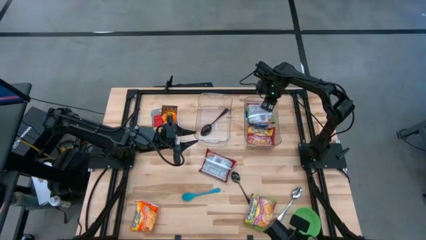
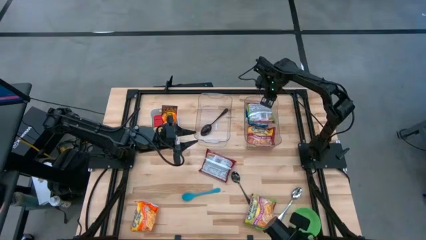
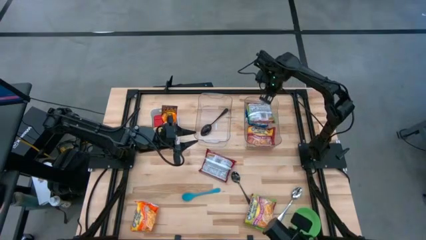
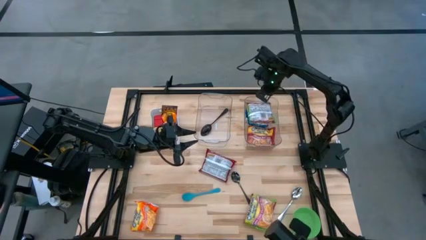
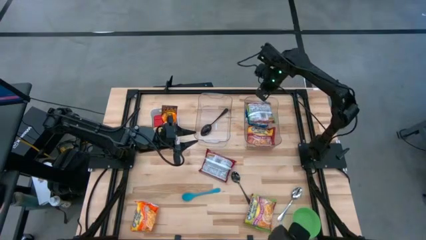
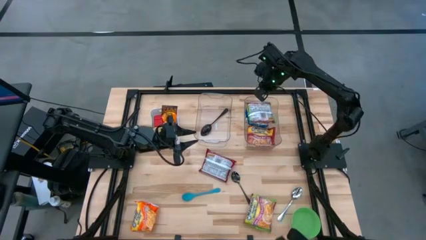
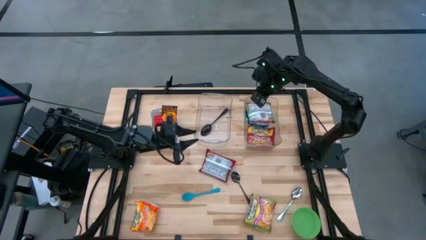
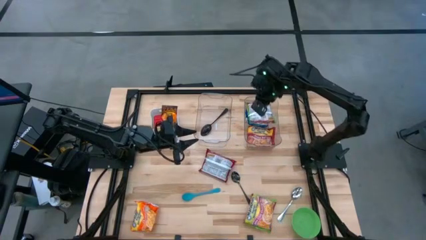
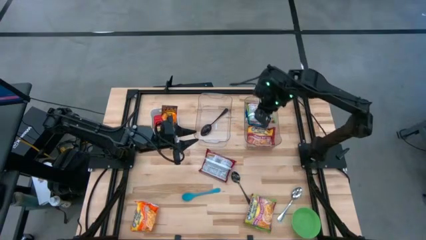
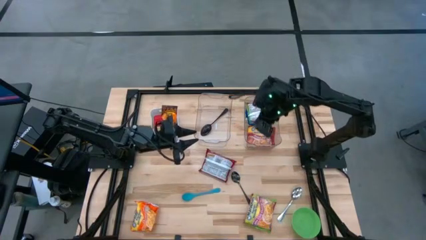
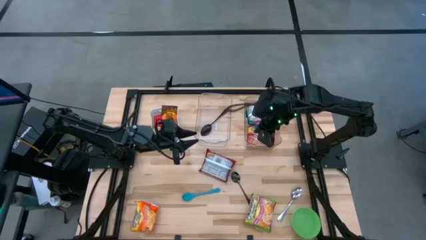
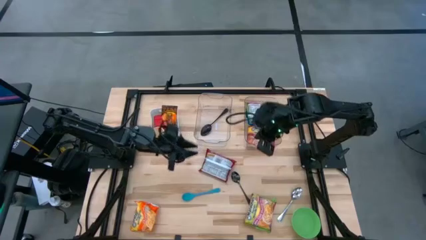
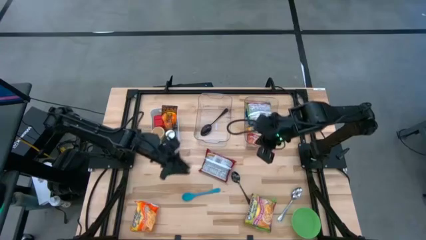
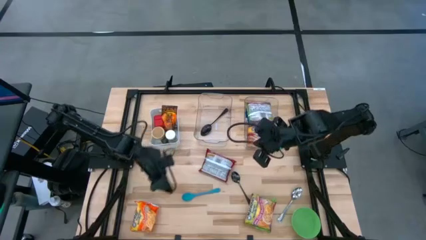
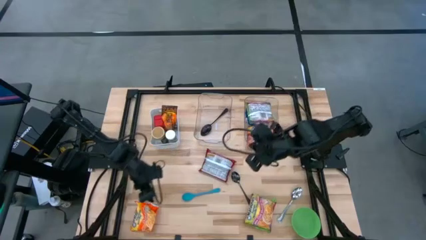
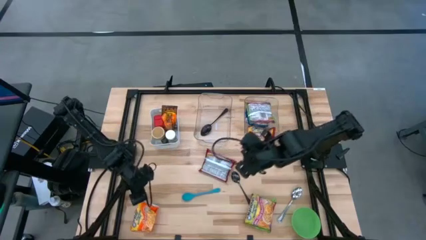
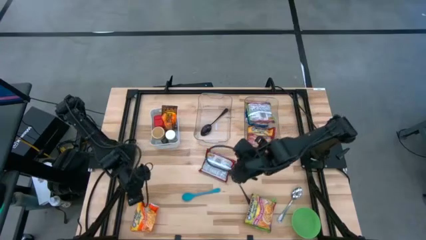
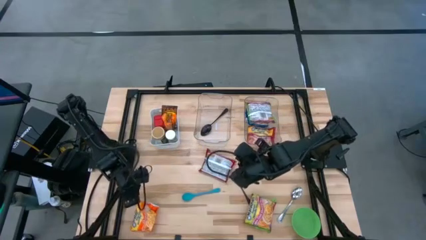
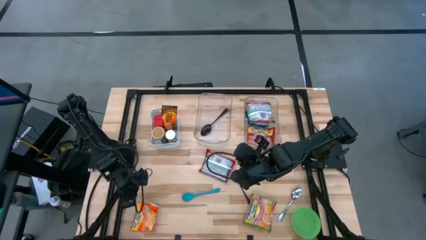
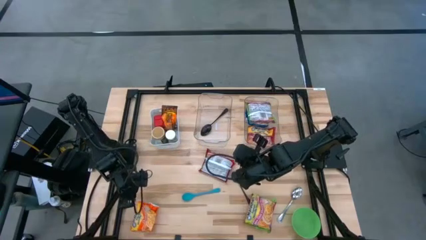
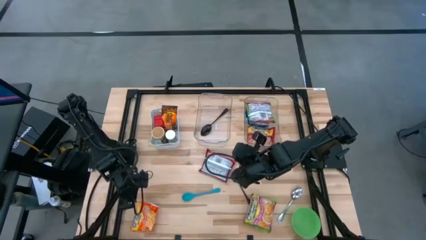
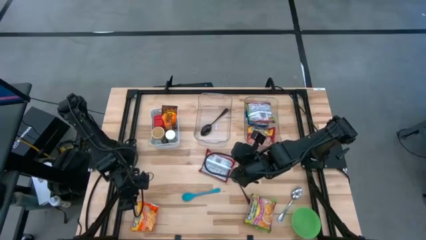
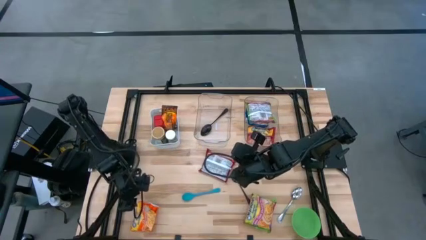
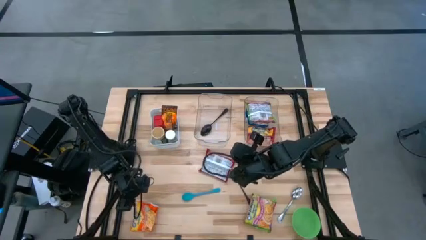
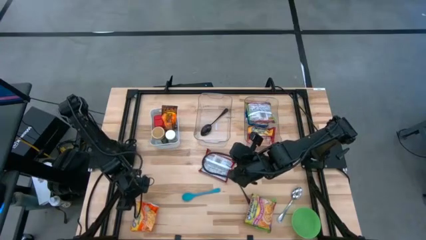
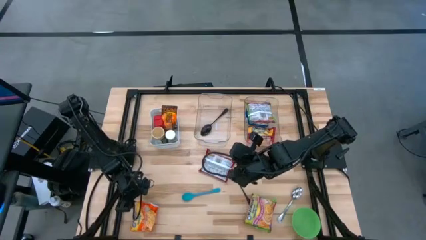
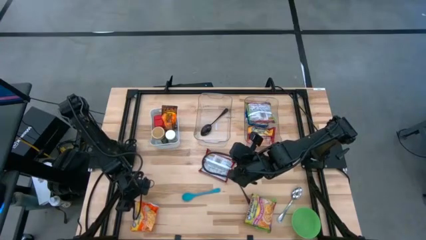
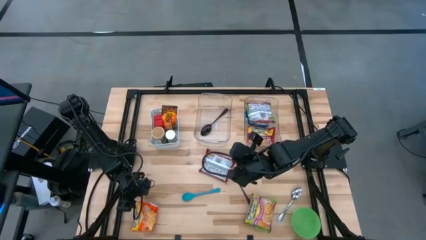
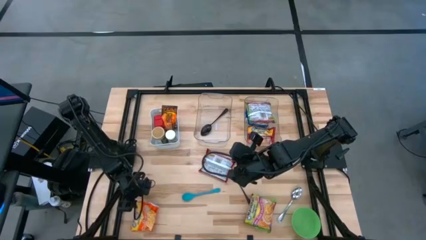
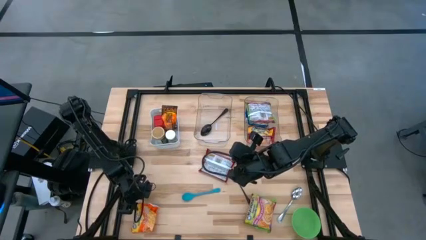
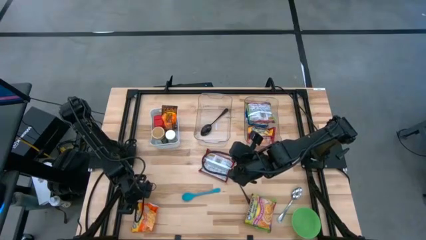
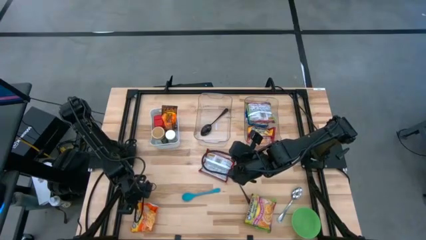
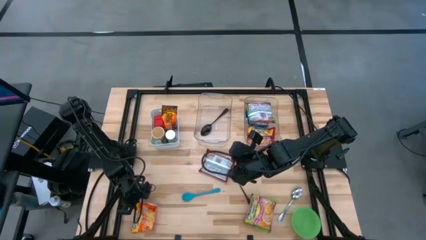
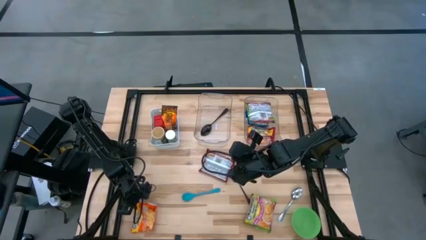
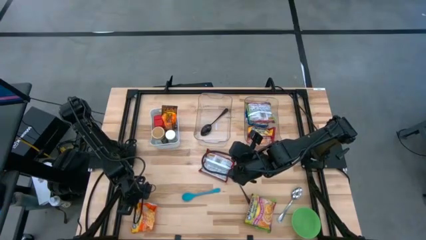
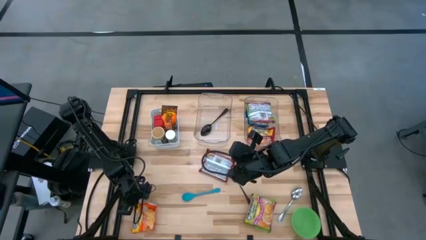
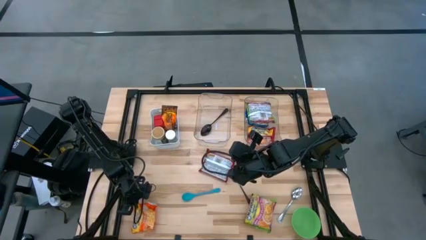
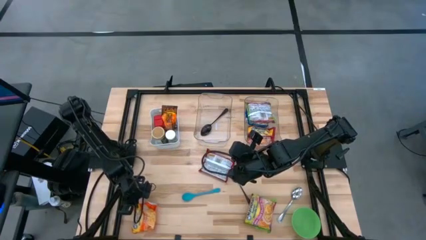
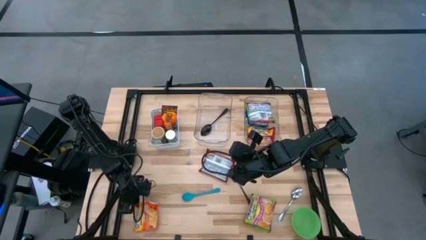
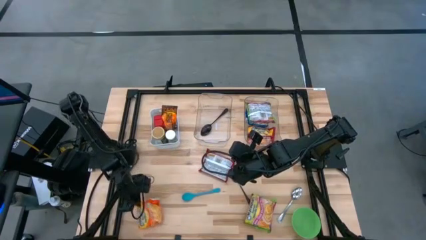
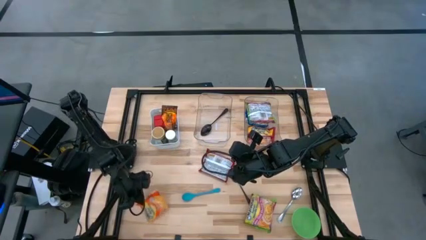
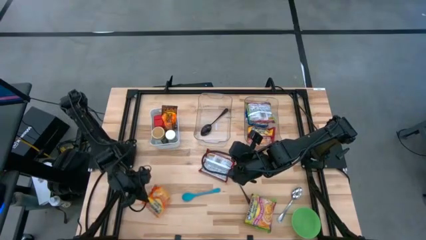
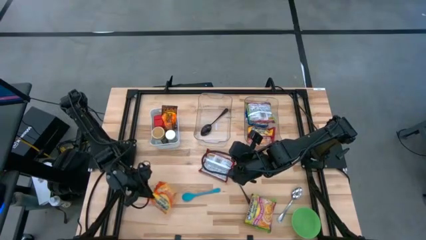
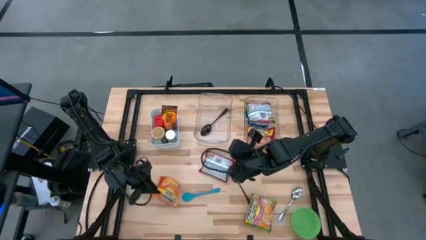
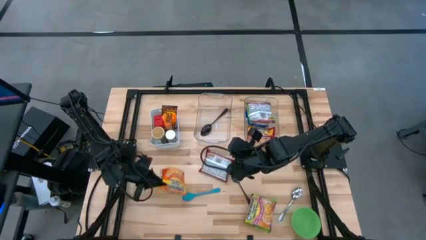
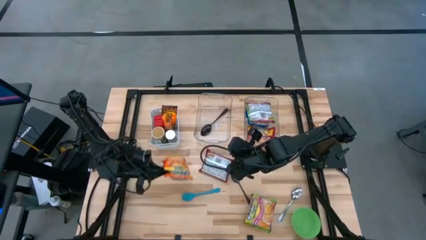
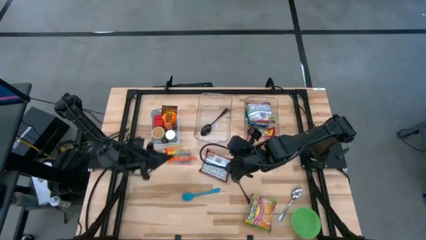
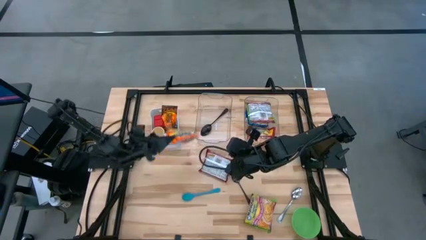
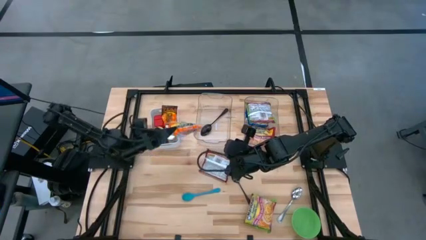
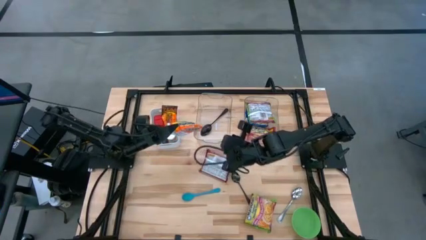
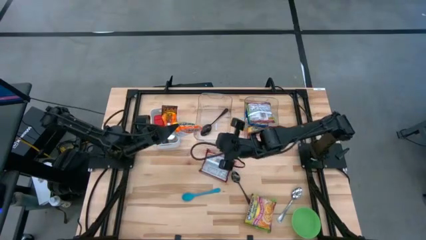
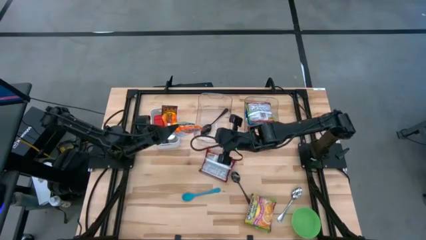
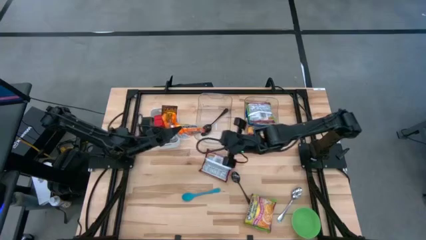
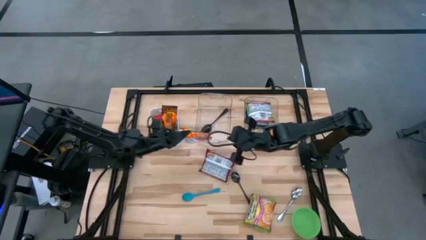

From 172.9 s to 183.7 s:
Task: Pick & Place Food Item
Put the orange noodle pack into the right transparent bin
